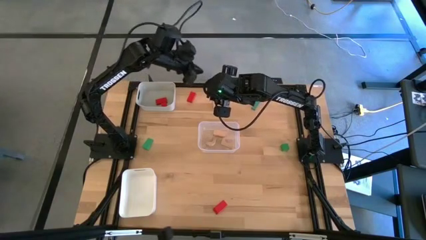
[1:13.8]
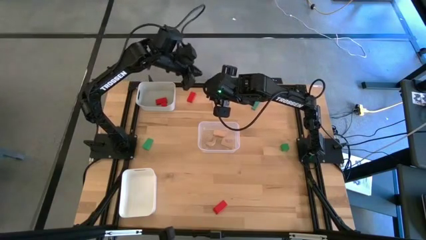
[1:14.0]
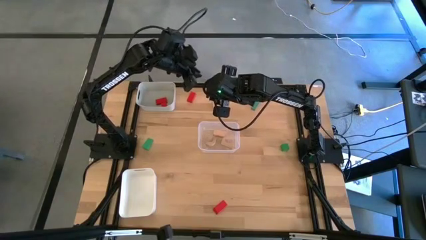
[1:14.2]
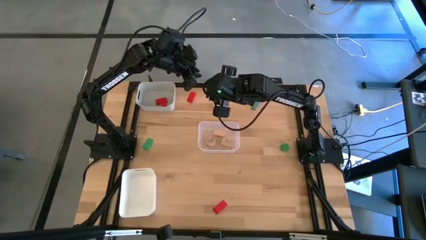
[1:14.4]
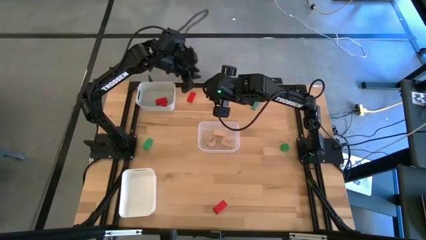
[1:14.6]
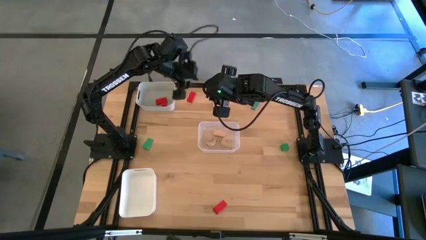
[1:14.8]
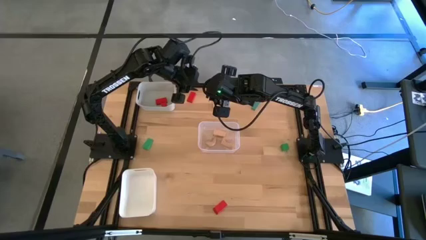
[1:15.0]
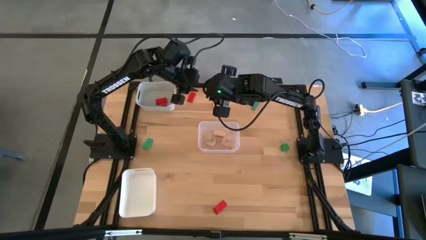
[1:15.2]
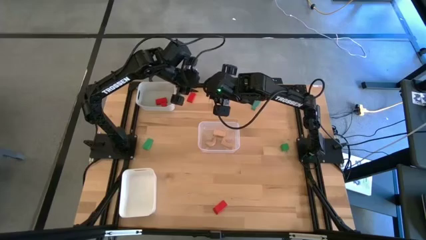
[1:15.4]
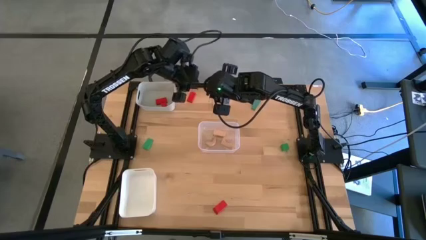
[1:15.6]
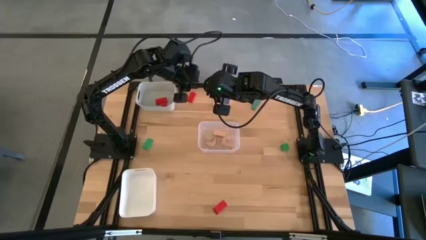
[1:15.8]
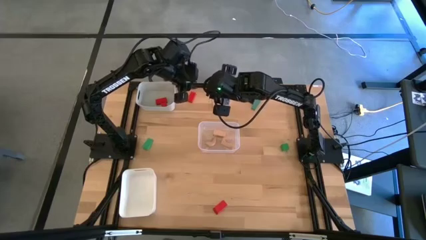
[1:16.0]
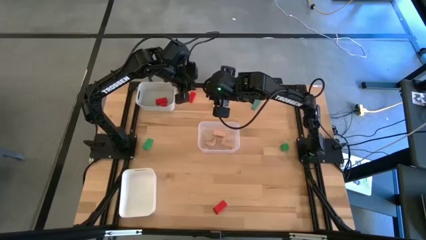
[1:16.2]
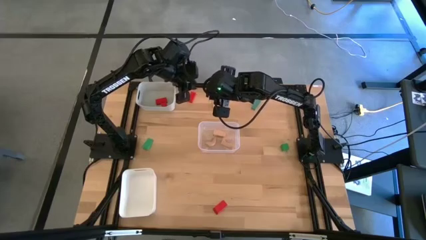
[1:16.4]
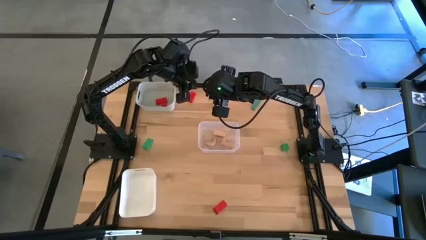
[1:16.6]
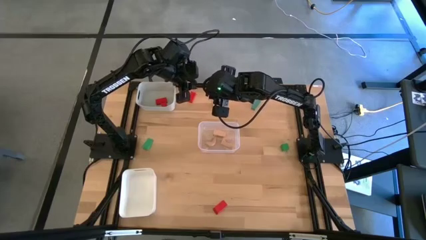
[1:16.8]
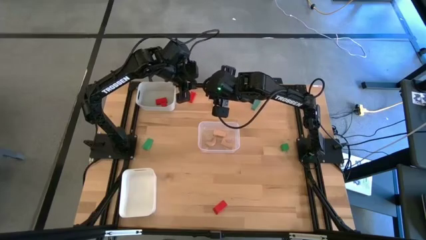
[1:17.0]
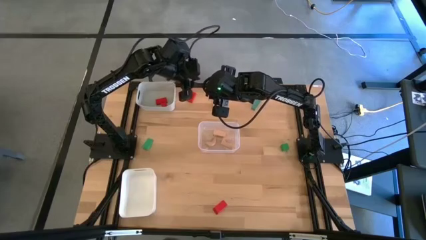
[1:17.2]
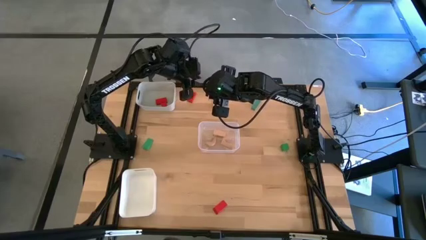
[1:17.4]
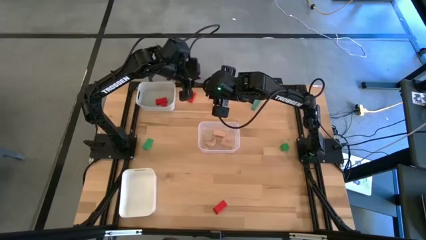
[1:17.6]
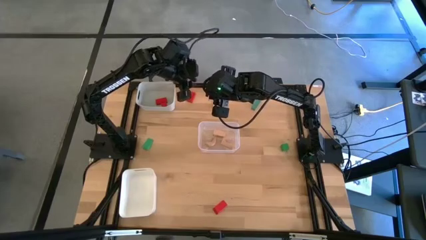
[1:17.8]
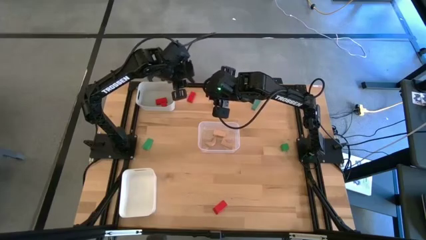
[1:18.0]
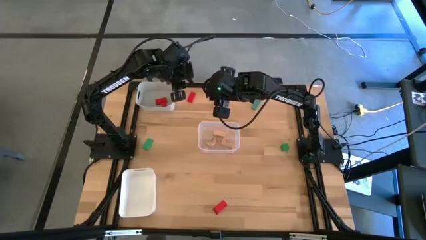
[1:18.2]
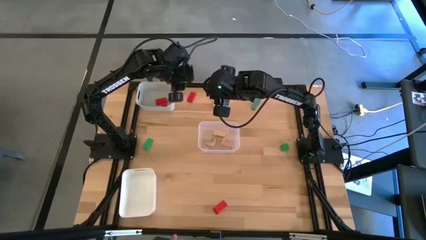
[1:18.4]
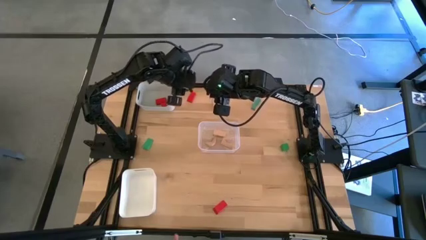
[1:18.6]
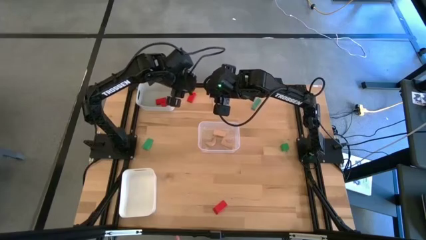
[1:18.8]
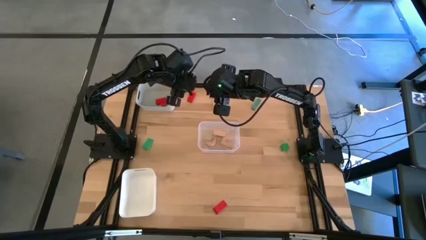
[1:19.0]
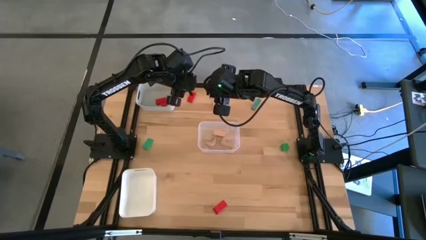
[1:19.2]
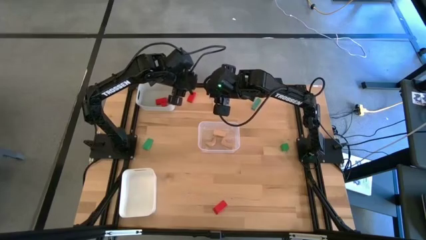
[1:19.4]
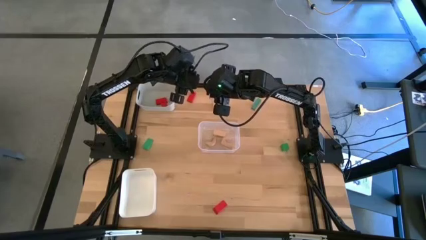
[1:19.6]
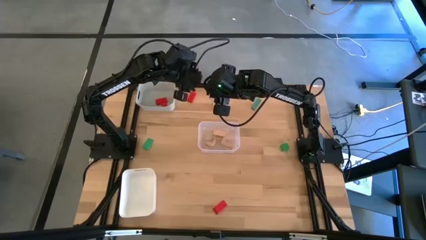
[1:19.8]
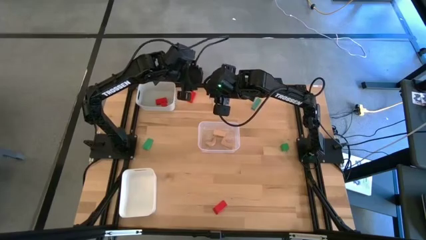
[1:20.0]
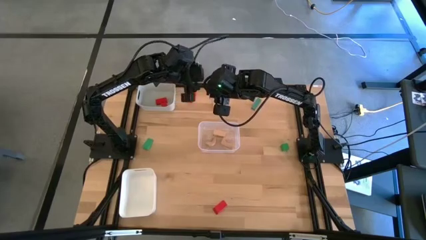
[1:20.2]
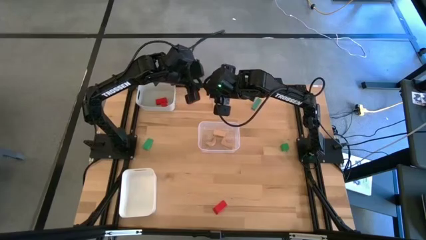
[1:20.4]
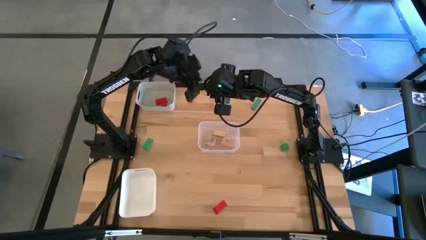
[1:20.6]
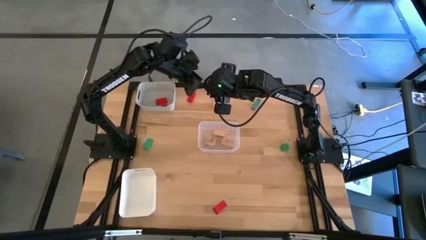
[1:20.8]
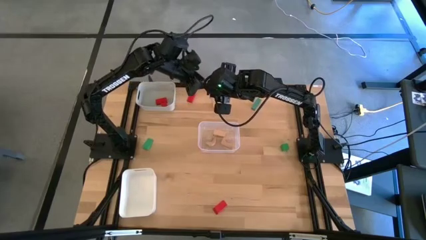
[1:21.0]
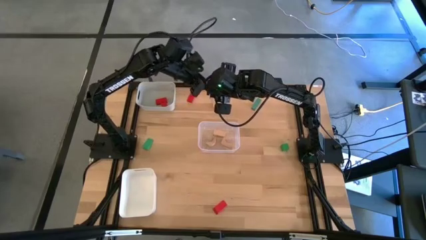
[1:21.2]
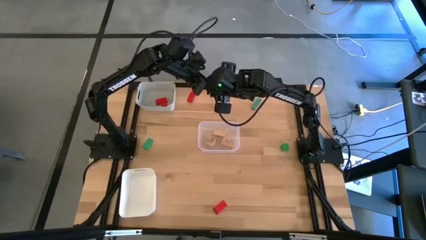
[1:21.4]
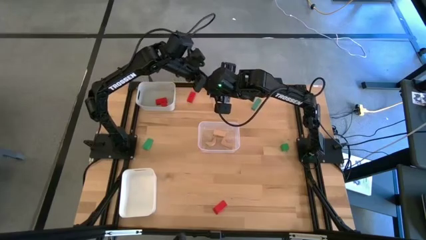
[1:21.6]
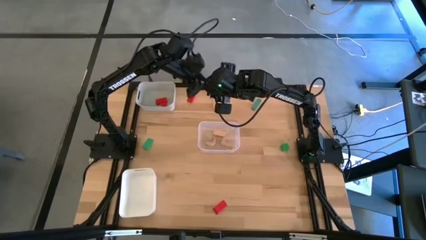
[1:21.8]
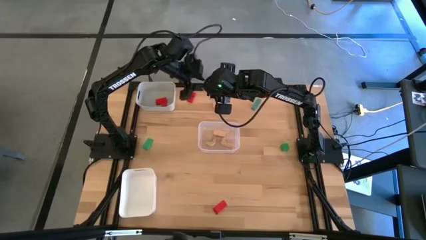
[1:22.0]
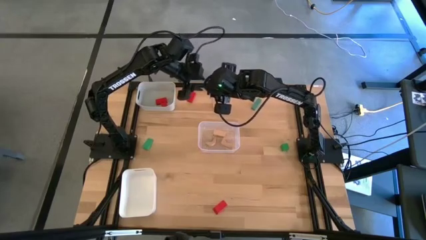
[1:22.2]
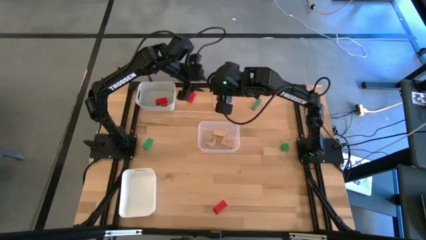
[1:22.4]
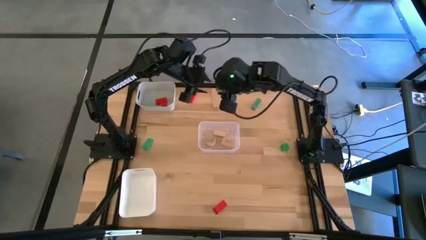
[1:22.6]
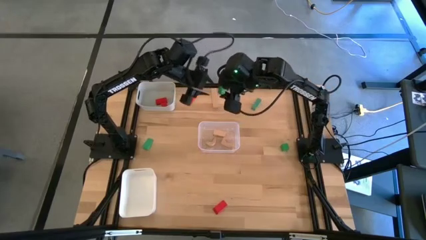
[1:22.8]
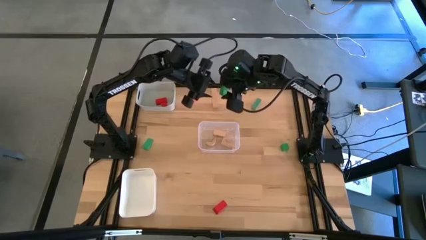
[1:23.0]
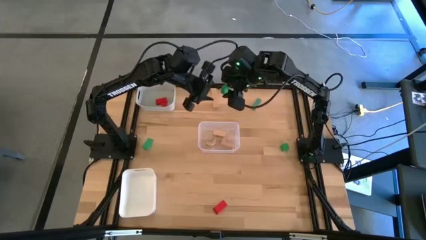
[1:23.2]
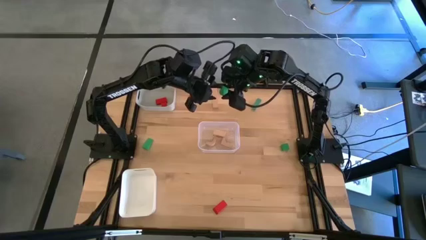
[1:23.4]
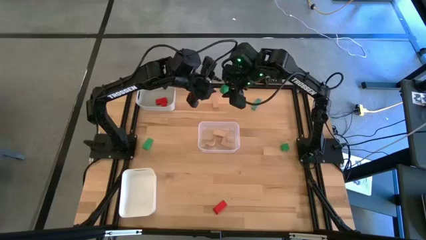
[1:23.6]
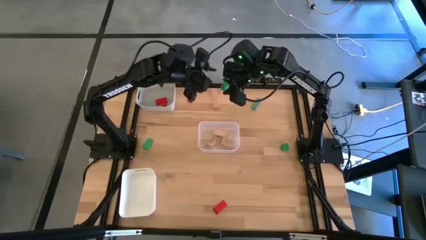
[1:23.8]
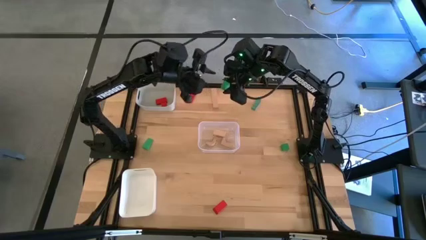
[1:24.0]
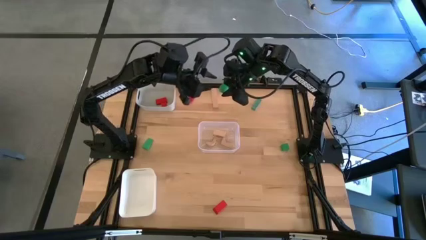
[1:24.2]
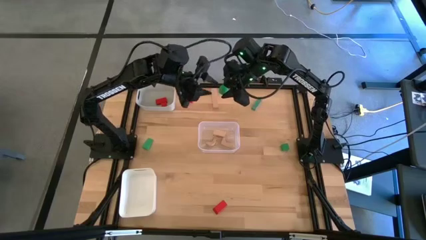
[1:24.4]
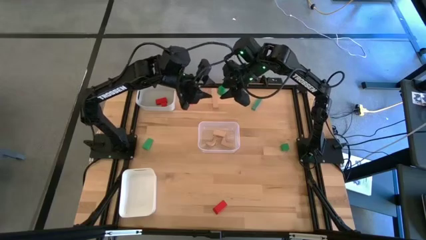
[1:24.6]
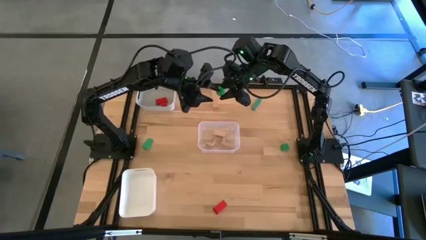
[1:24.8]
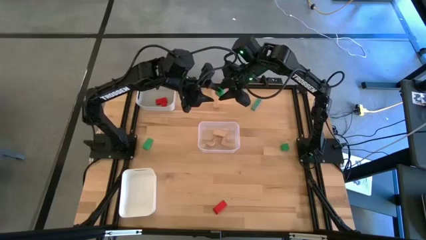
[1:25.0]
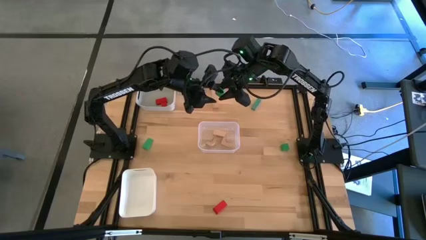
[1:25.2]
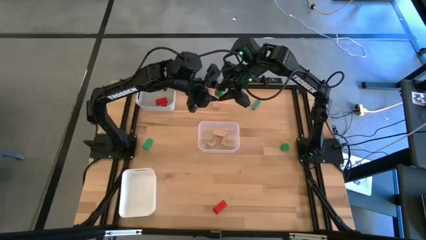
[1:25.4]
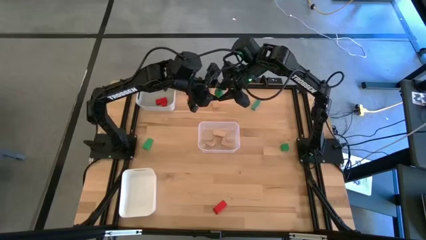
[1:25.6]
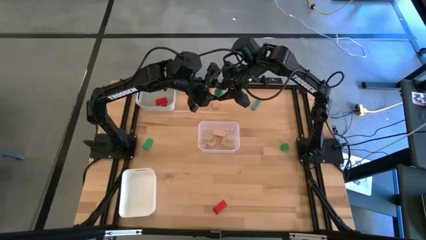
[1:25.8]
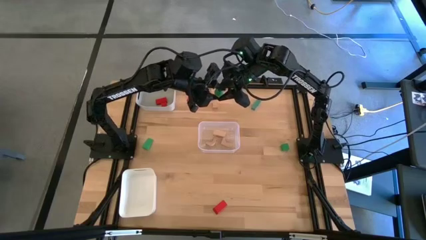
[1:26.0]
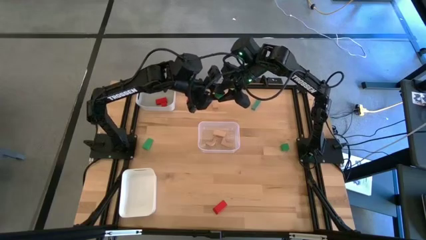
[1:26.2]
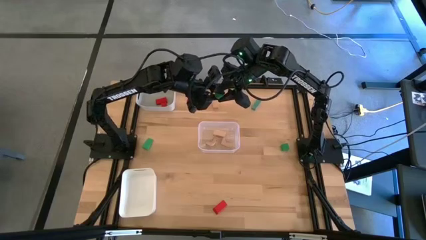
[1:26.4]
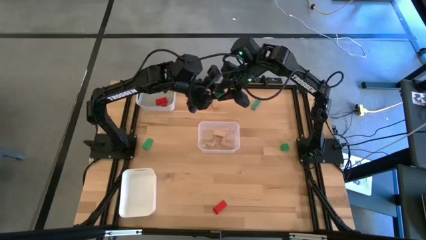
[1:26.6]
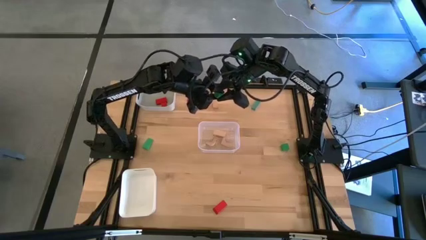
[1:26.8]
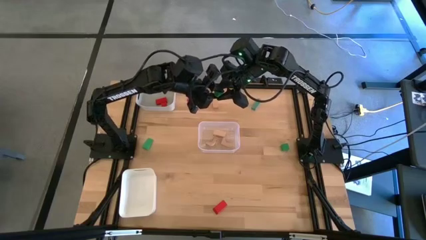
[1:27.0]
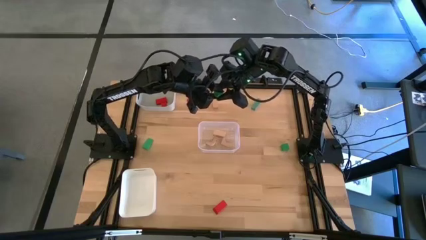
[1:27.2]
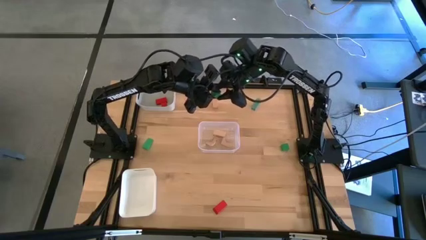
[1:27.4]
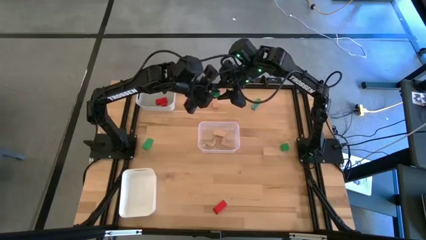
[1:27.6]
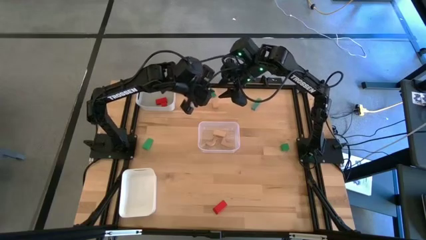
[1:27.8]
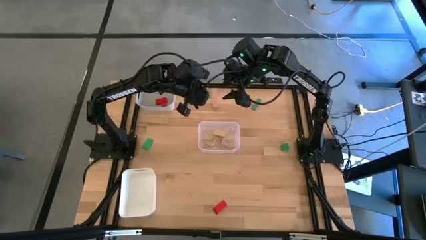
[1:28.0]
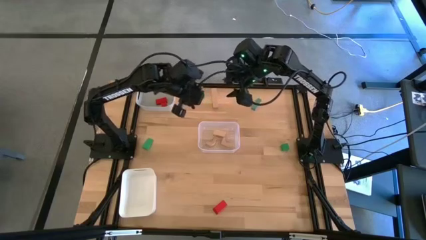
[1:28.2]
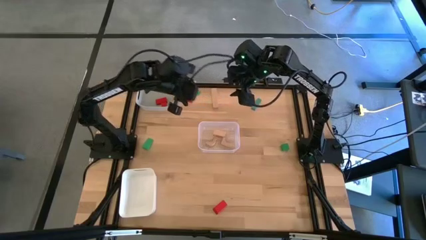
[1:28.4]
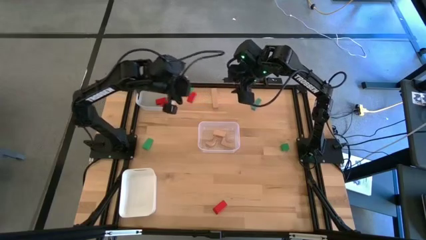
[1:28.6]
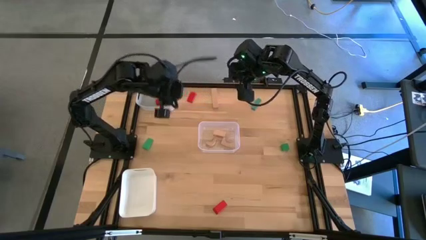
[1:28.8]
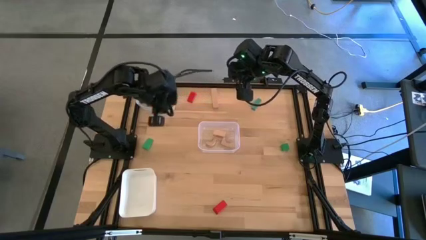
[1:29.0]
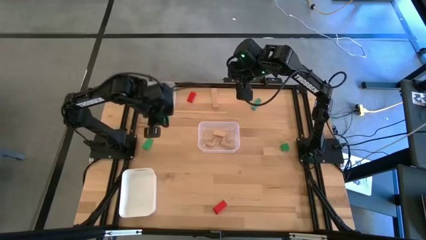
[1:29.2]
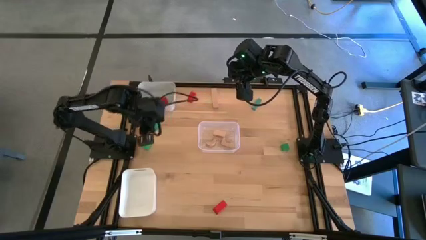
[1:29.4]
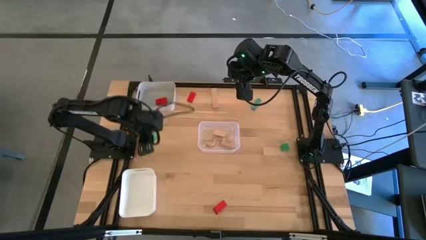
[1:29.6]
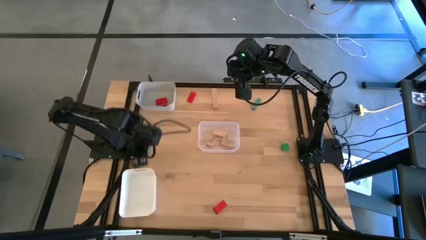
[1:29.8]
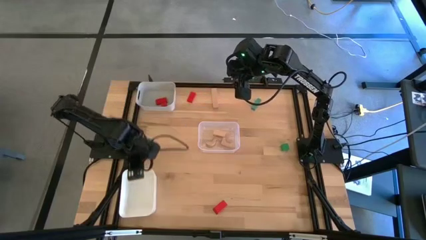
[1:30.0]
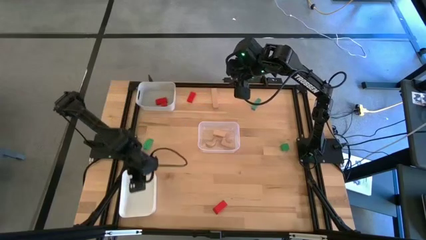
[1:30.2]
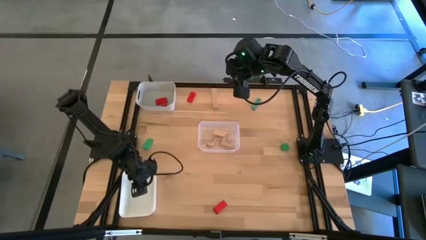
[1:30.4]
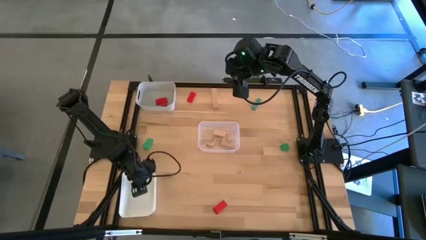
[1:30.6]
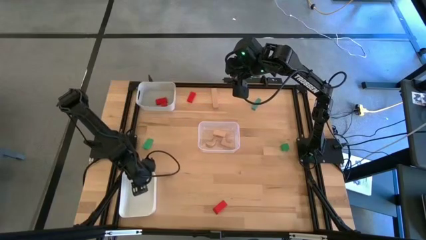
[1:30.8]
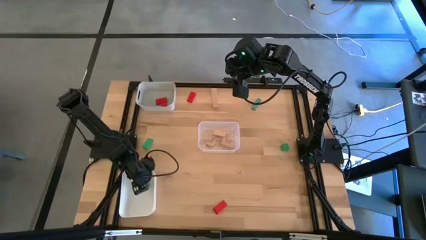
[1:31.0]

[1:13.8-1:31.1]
Task: Sort & place blocks by color
Put the green block into the white bin
